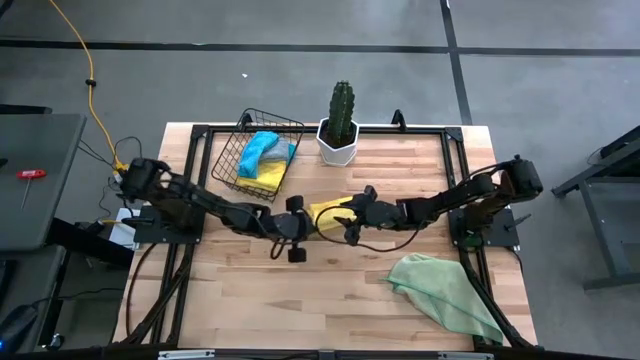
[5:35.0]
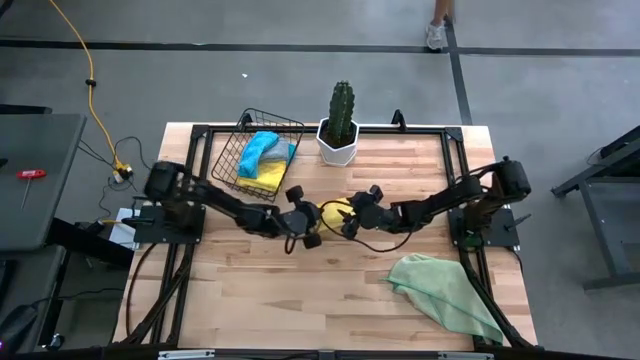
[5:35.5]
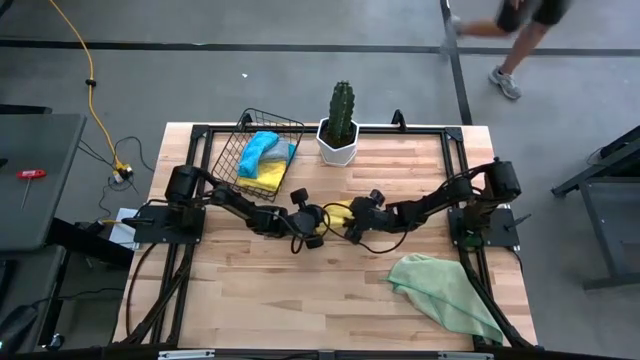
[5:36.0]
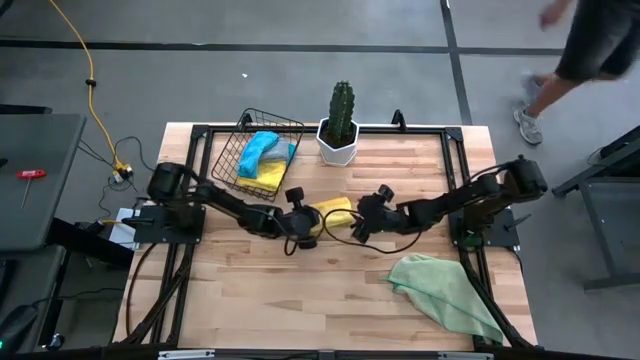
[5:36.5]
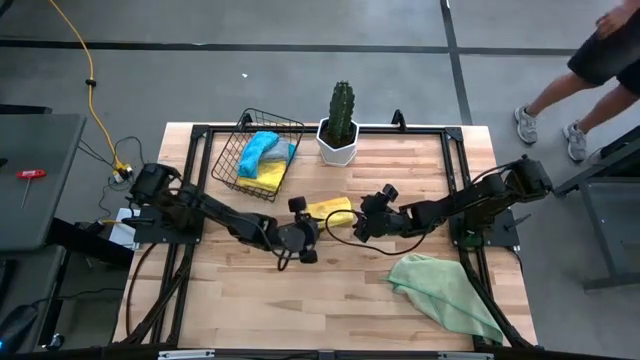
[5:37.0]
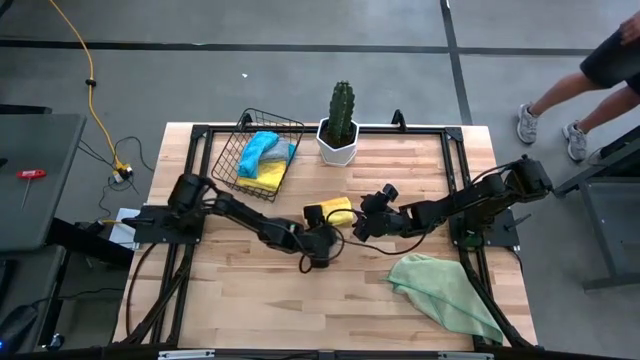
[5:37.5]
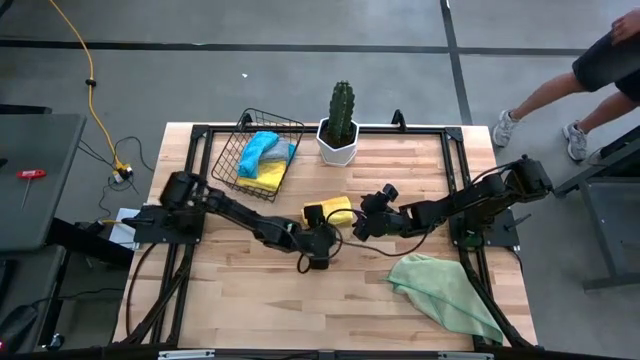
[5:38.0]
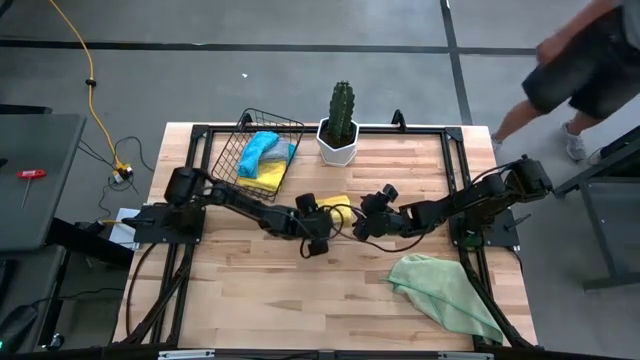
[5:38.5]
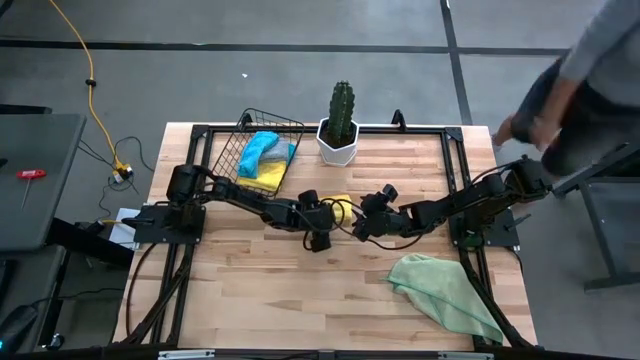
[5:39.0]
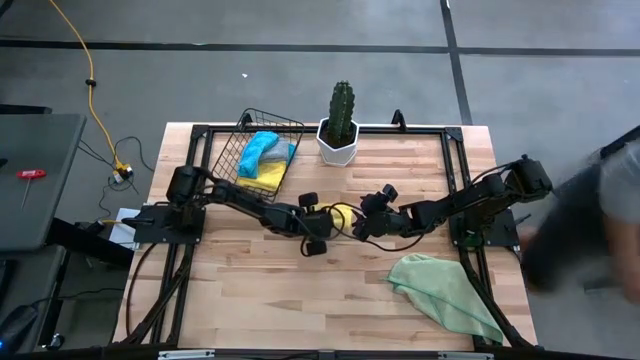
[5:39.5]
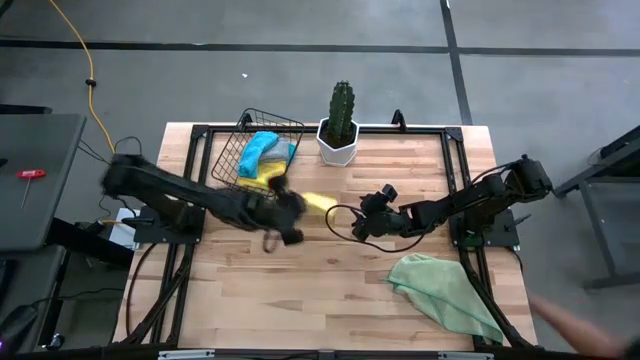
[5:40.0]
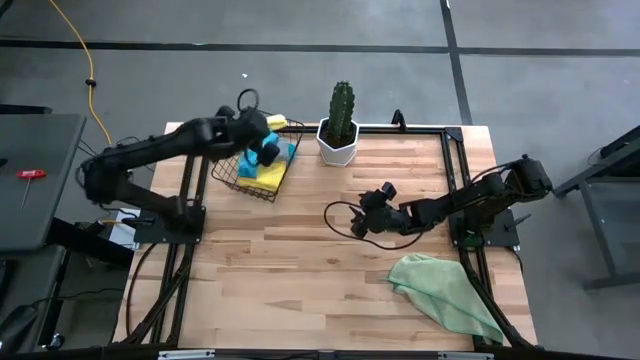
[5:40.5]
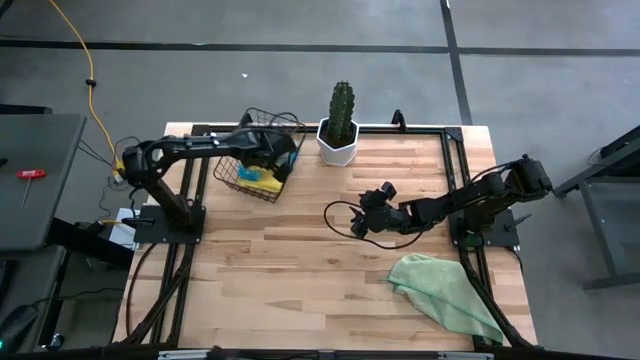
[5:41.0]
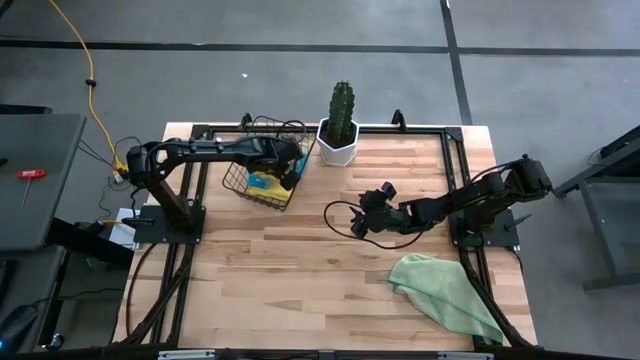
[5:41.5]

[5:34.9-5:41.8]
Task: Fold microfiber towels
Put the folded yellow microfiber towel into the mesh basket

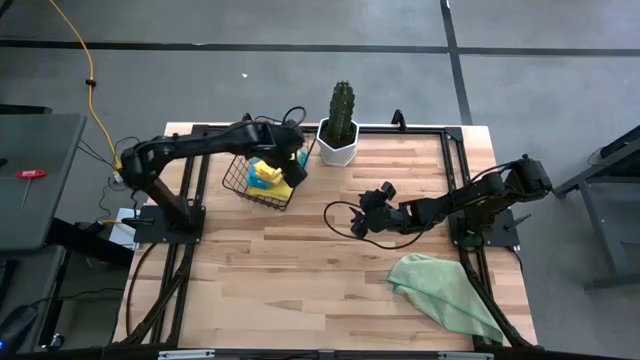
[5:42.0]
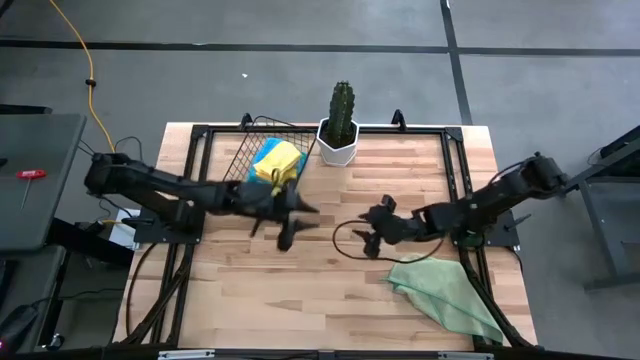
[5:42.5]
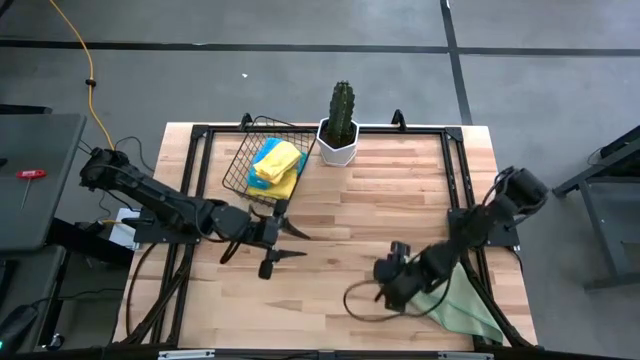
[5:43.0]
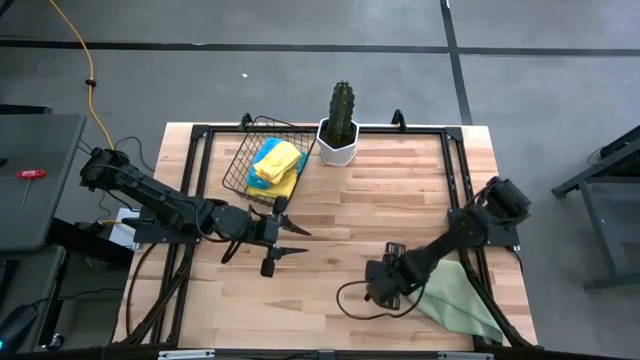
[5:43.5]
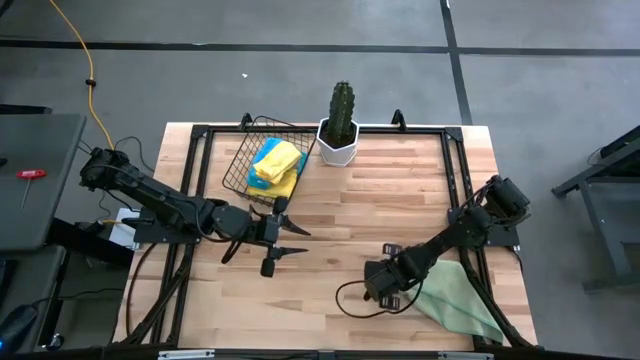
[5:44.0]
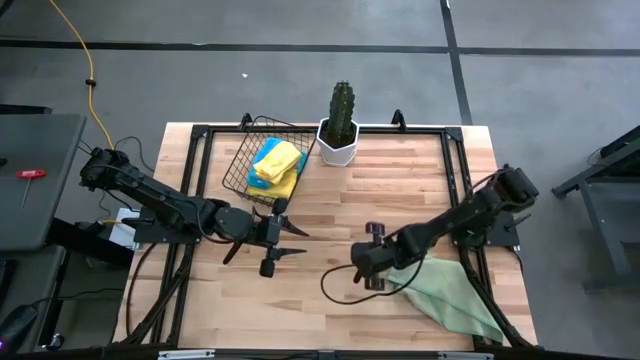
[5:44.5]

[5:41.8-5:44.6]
Fold the green microfiber towel on the table

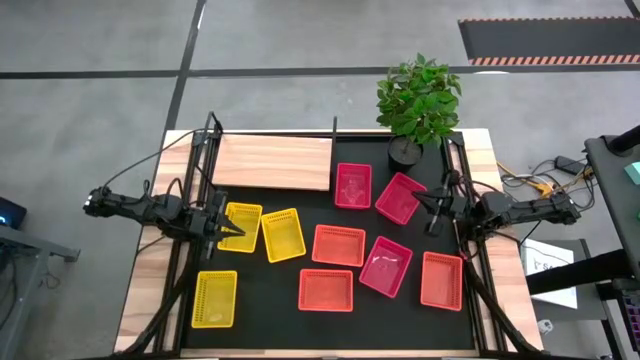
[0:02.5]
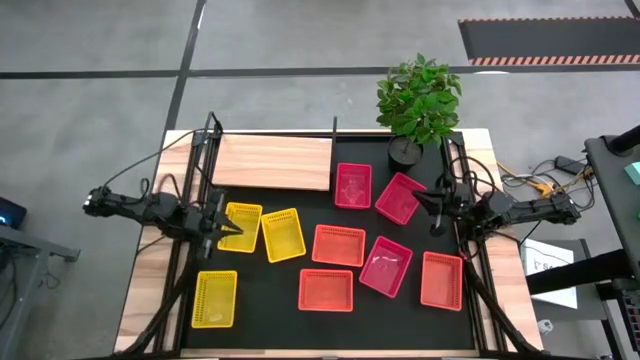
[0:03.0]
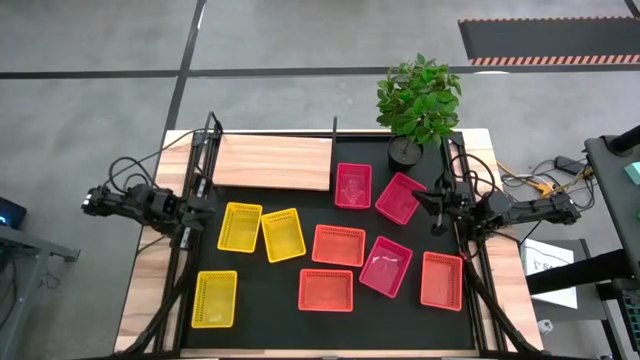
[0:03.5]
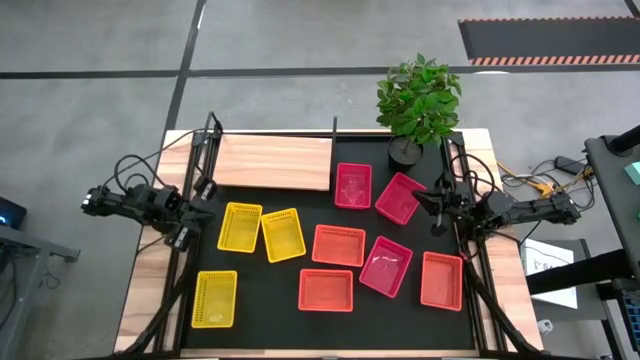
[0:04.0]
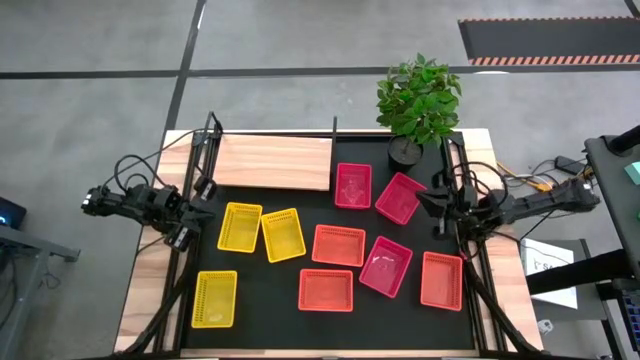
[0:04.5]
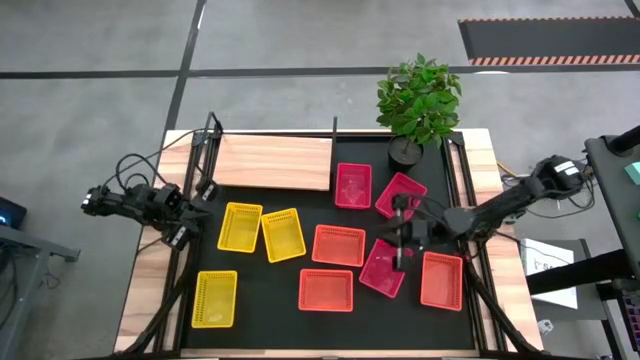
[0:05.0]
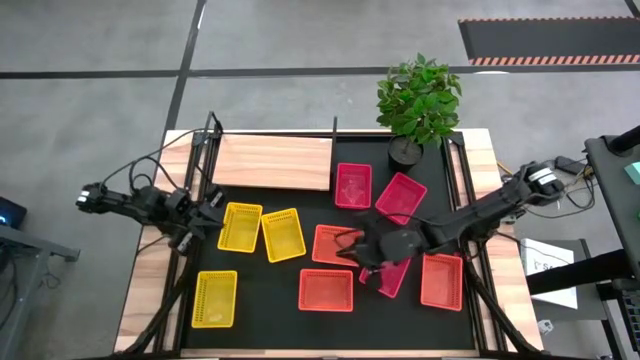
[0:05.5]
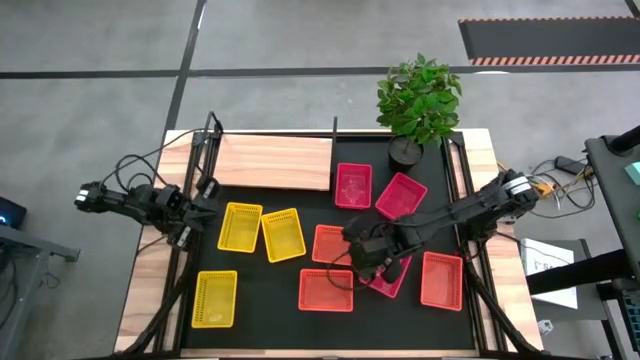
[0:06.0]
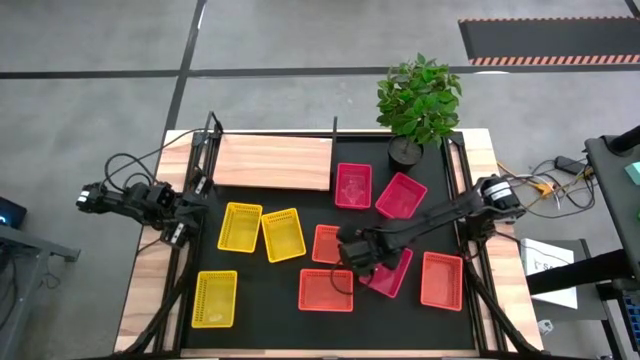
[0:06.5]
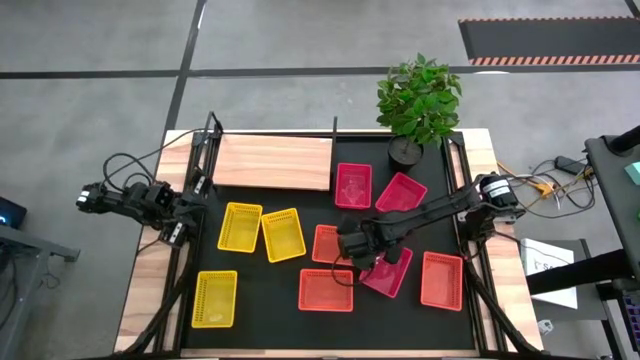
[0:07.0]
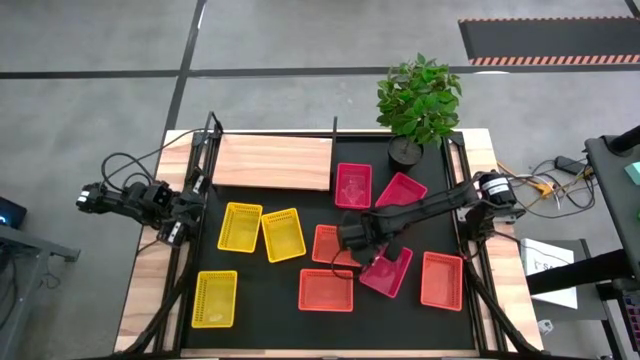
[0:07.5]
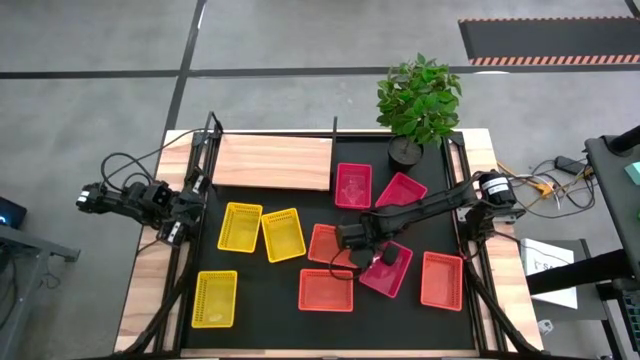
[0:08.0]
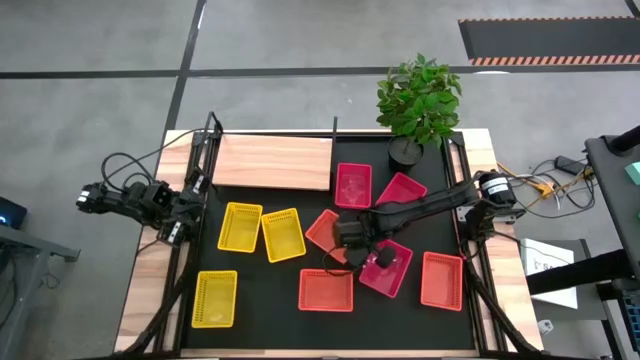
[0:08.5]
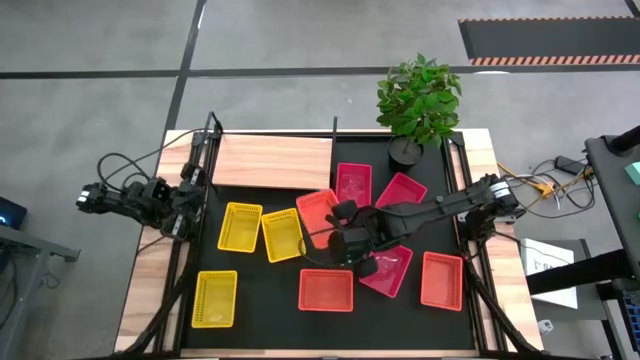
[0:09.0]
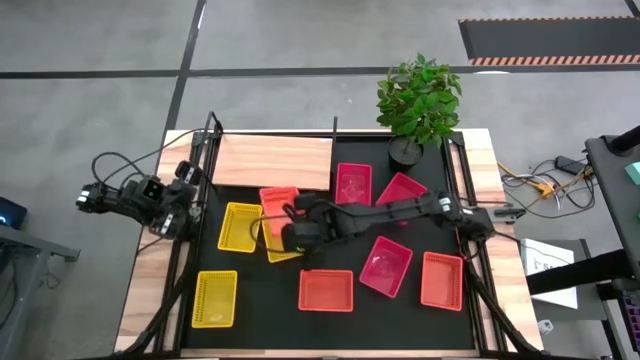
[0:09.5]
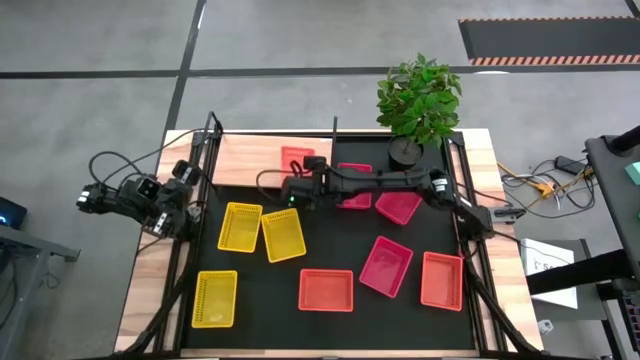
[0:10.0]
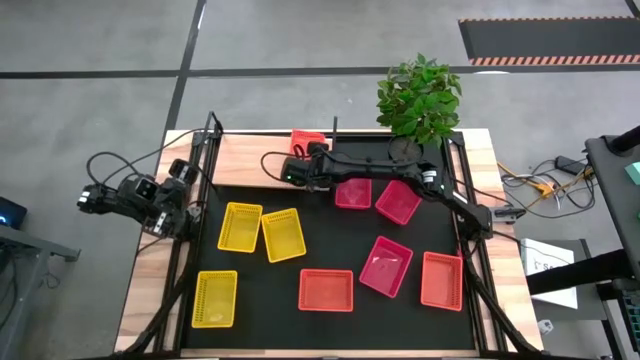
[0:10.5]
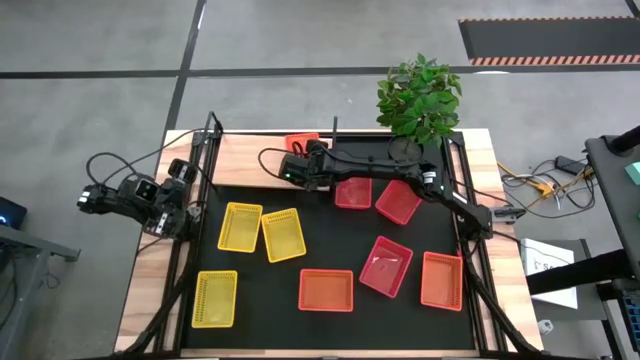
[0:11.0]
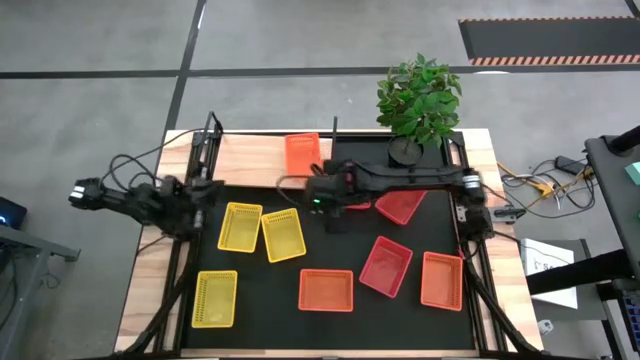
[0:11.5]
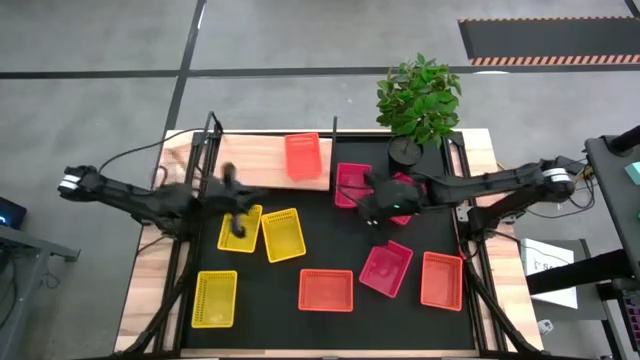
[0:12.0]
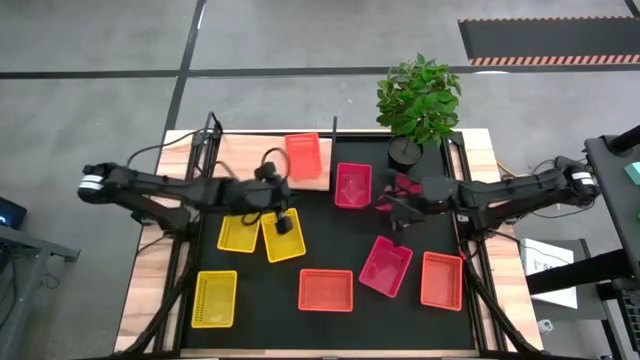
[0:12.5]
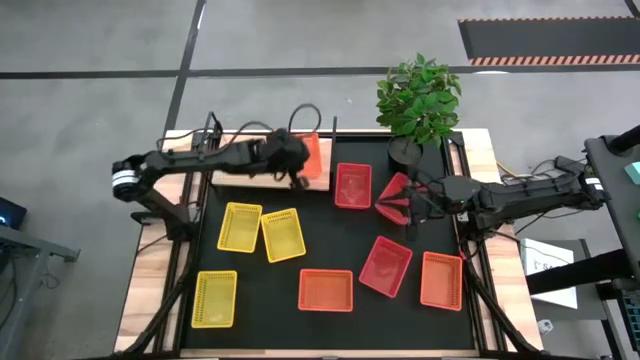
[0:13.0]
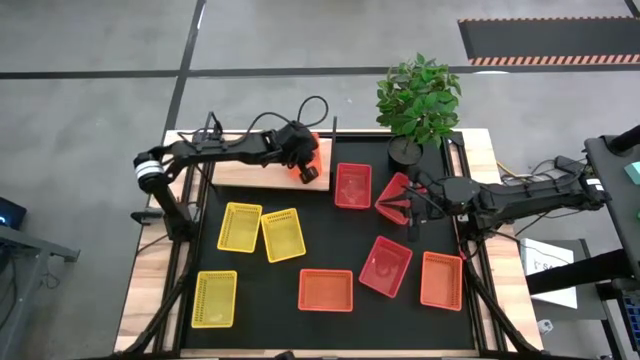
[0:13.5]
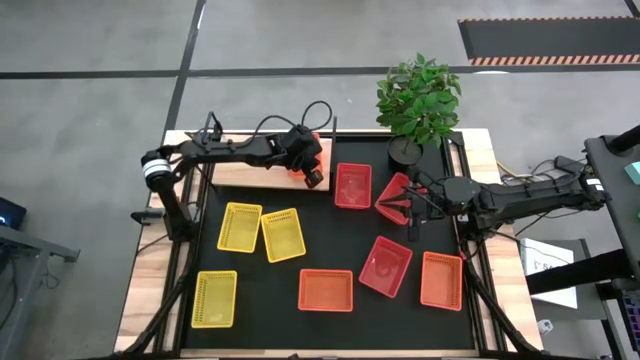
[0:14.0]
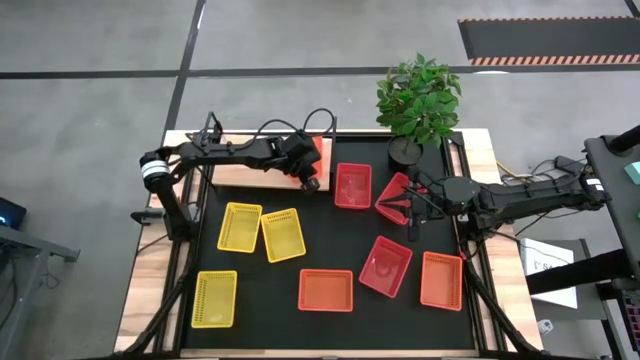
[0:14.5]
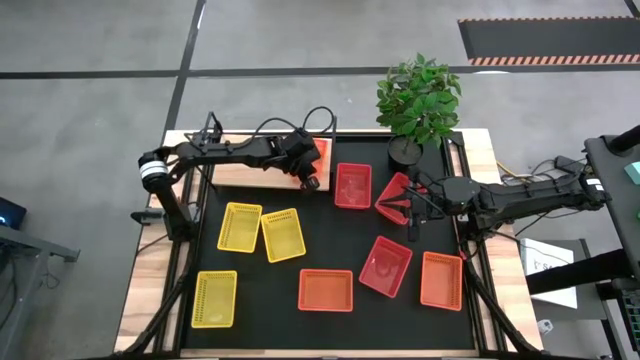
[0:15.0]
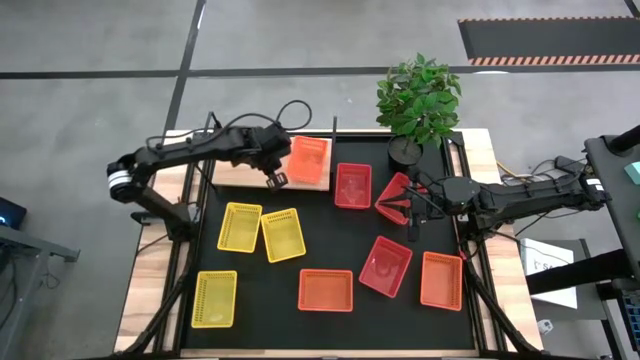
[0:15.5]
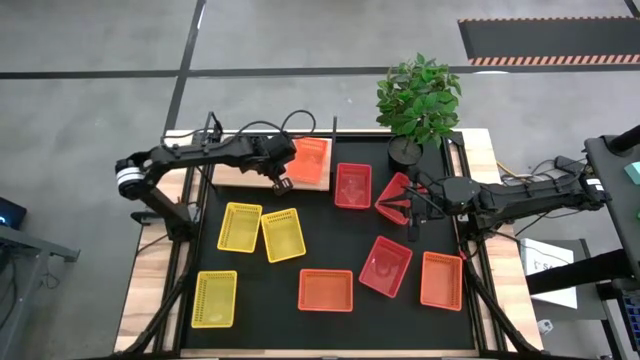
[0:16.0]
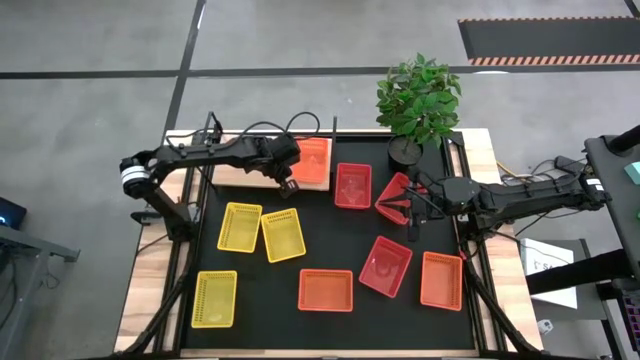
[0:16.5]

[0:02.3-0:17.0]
Task: Stack baskets on shelf by color
Put the top left orange bin on the shelf
